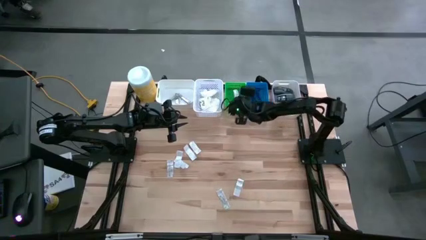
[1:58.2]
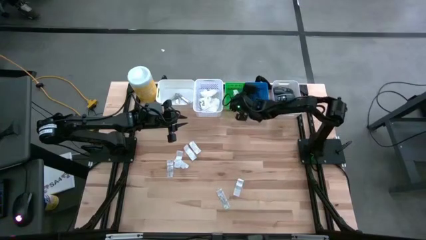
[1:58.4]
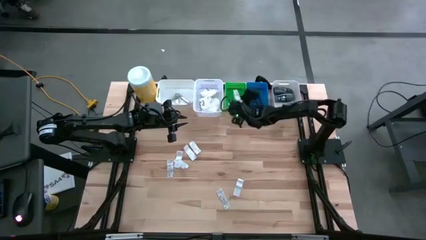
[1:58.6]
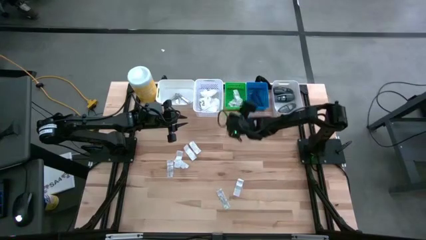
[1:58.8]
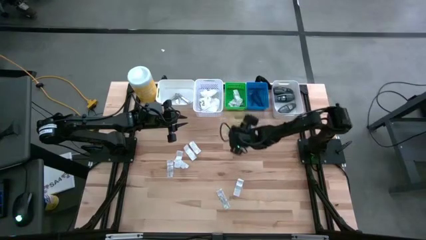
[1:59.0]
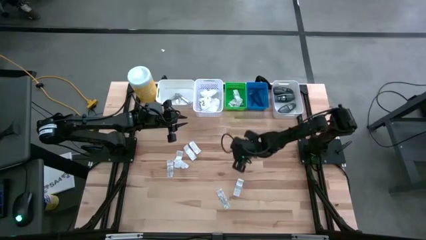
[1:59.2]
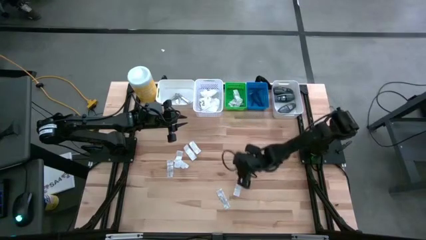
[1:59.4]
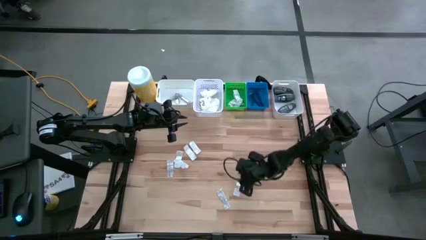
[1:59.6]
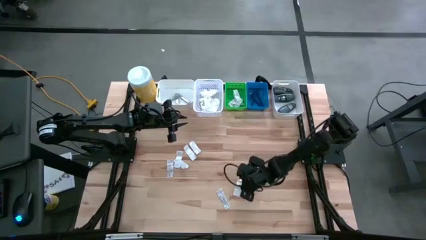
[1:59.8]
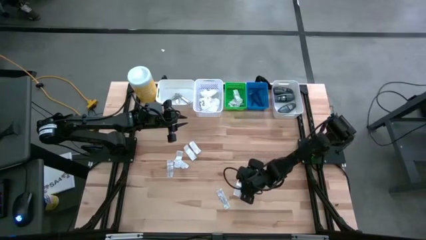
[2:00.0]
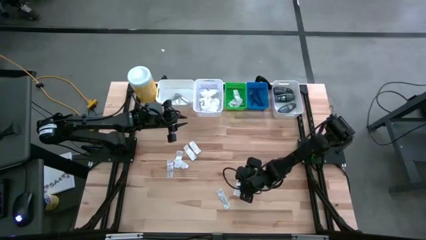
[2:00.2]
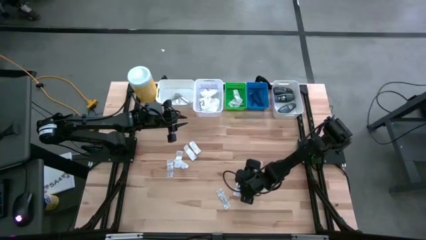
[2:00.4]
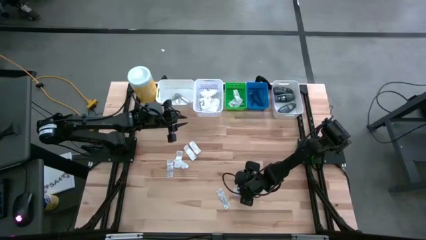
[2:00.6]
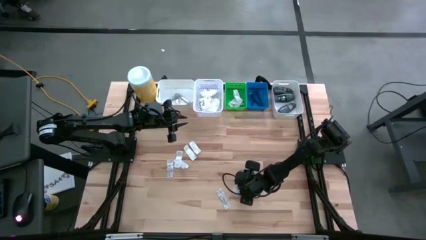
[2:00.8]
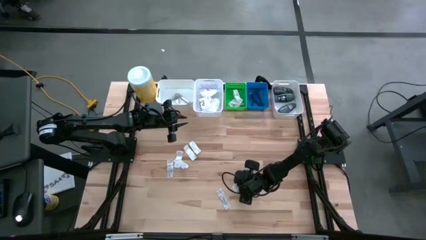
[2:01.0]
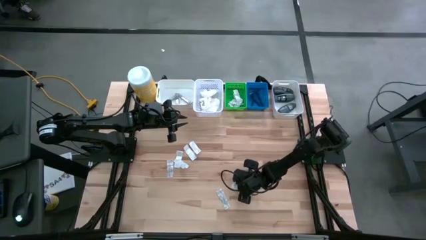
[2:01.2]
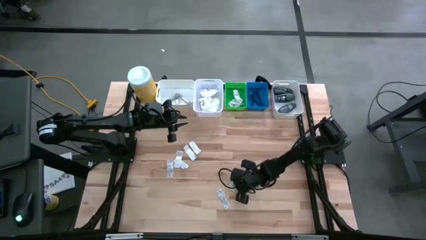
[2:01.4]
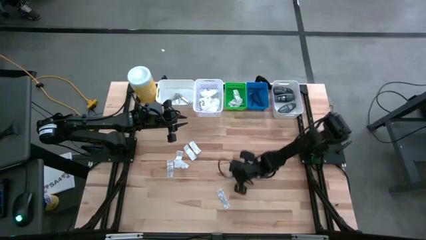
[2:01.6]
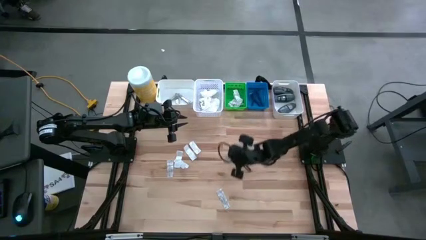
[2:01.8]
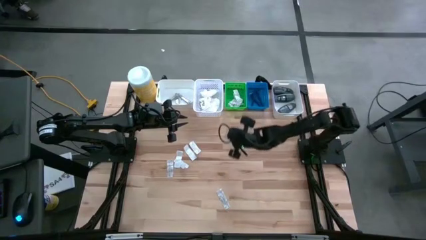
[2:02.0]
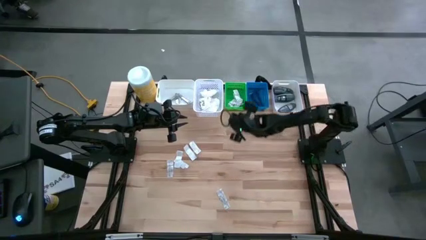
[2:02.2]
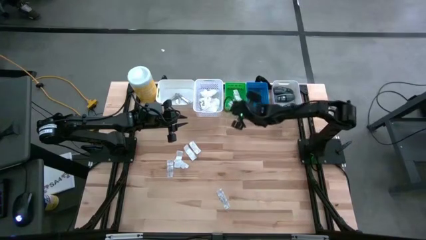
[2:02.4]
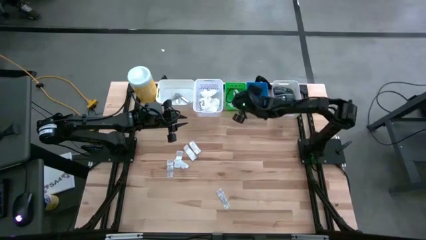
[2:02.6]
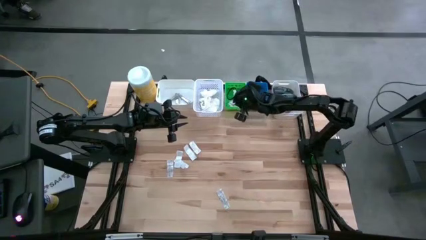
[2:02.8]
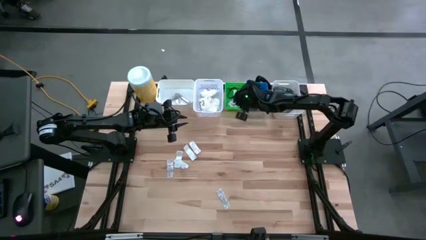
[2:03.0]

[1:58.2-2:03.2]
Task: Pick & Place Travel size toiletries
Put the white bandage into the green bin

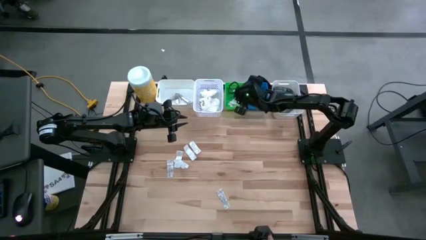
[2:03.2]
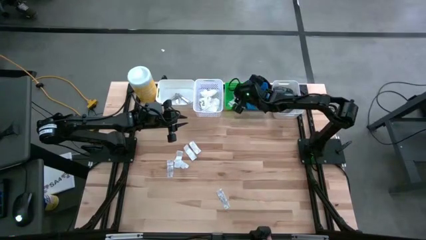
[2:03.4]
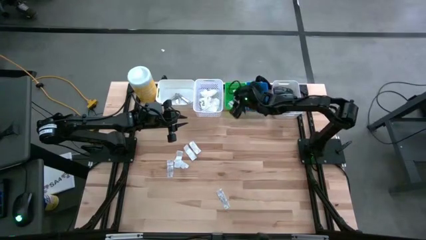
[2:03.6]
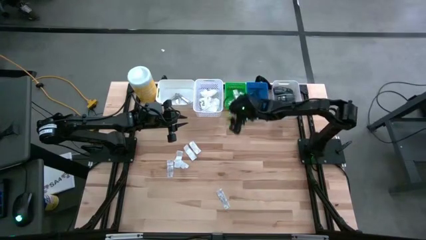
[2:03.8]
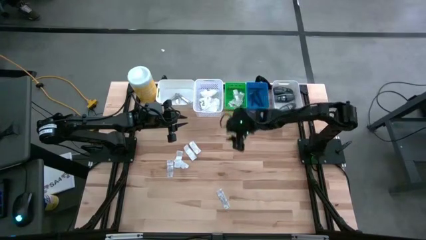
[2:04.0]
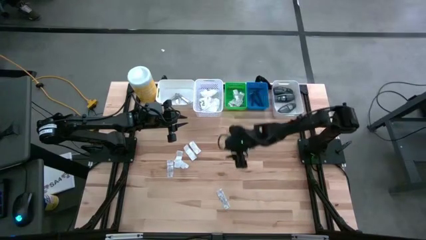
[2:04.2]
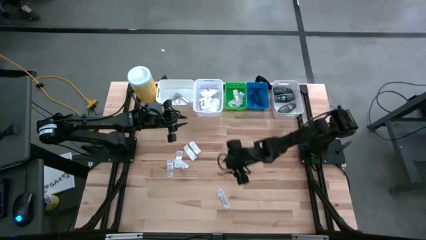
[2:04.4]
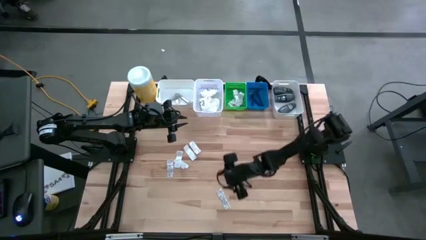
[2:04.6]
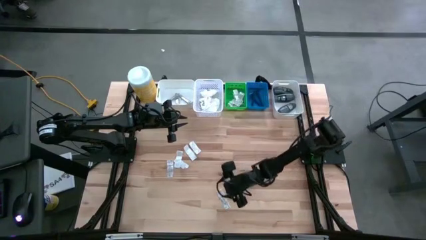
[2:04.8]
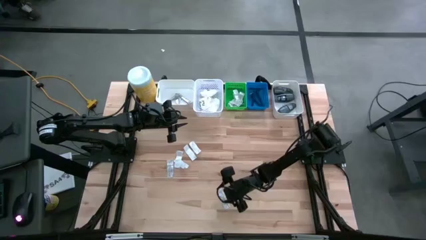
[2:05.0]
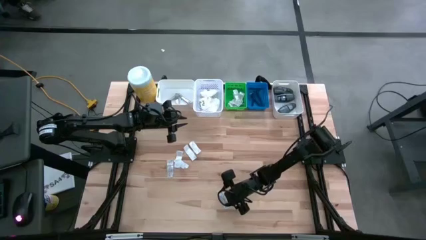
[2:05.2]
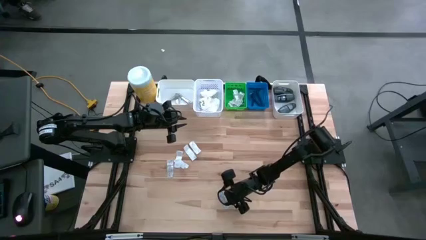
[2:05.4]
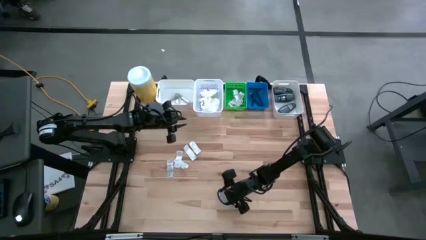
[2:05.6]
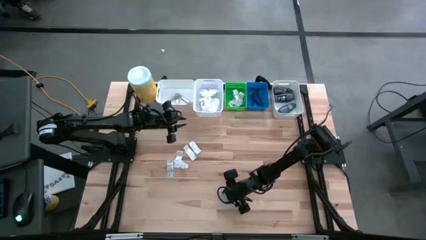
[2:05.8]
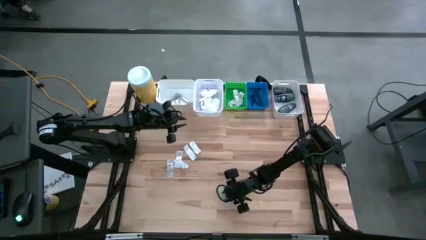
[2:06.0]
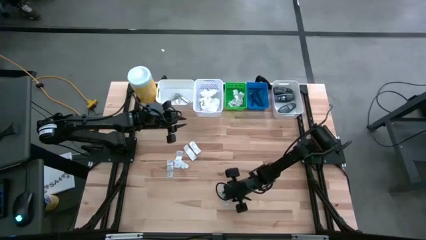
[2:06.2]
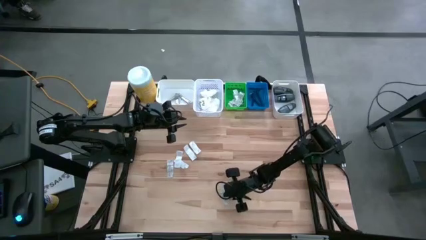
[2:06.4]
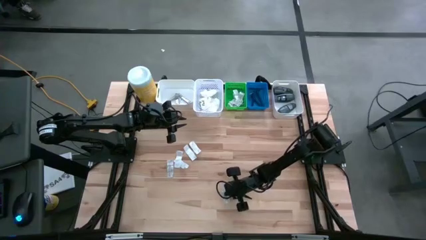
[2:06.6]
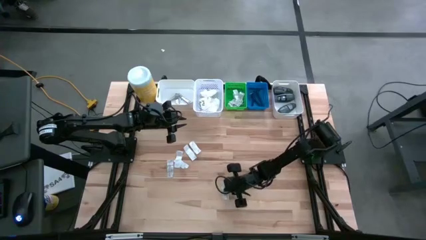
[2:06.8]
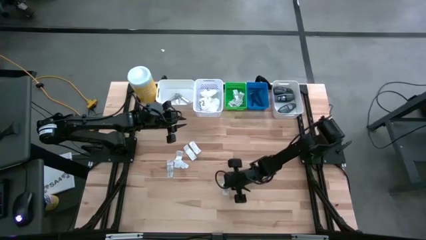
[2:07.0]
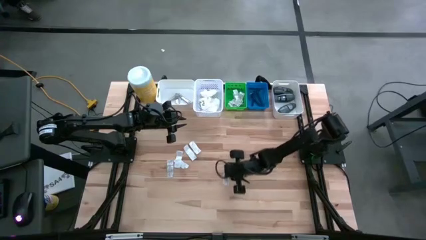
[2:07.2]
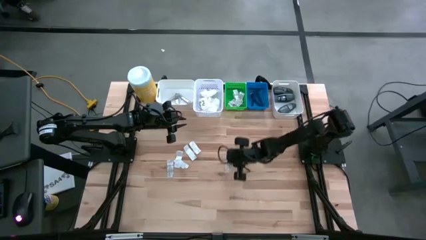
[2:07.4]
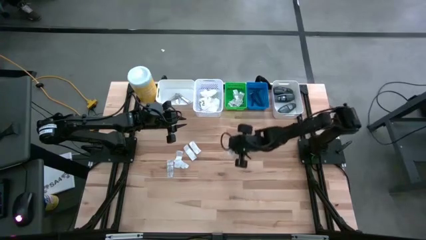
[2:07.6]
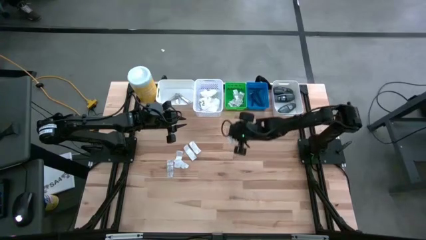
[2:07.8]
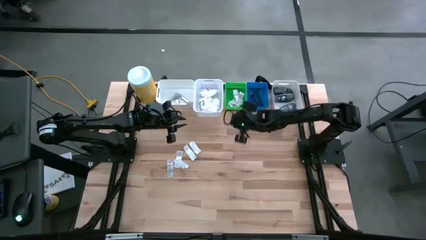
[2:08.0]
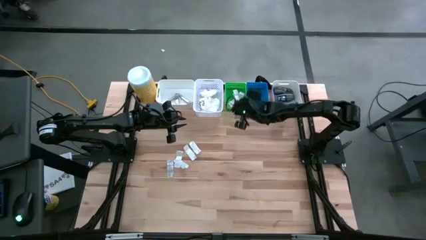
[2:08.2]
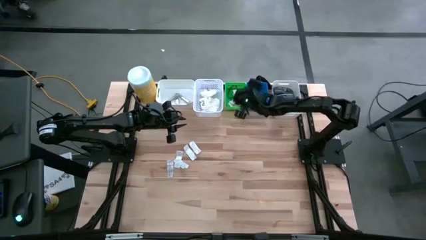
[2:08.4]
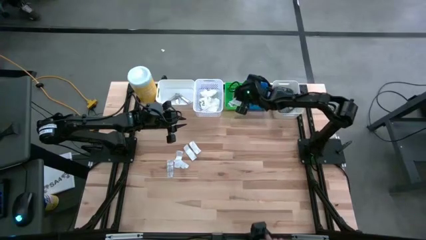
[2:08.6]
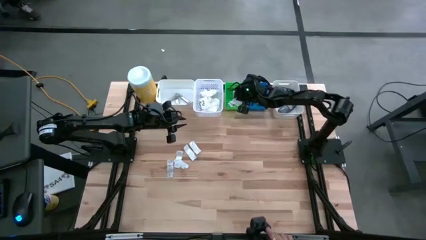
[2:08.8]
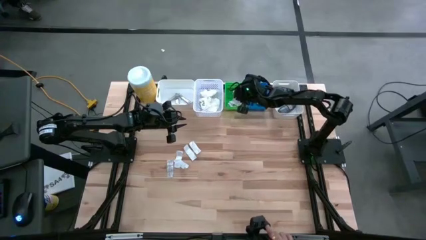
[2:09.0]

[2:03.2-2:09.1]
Put the white bandage into the green bin

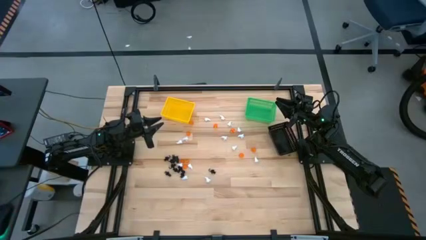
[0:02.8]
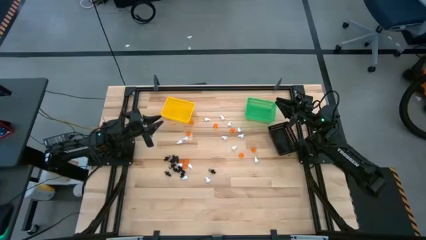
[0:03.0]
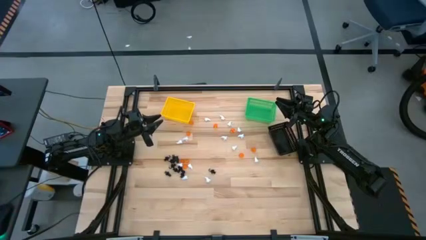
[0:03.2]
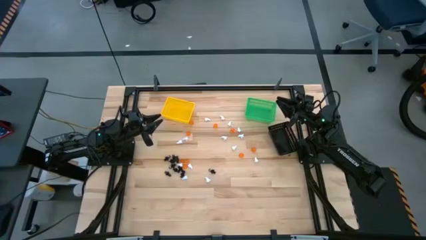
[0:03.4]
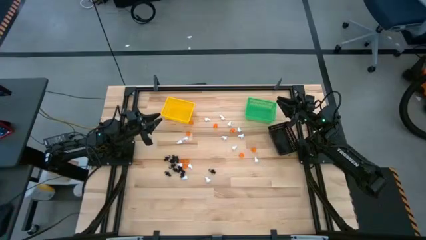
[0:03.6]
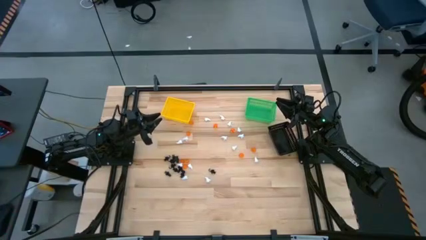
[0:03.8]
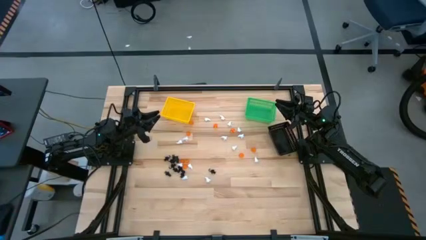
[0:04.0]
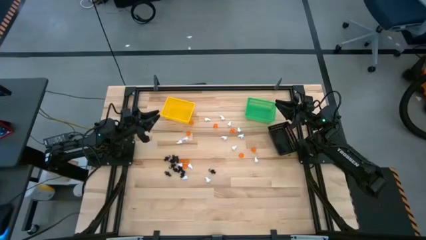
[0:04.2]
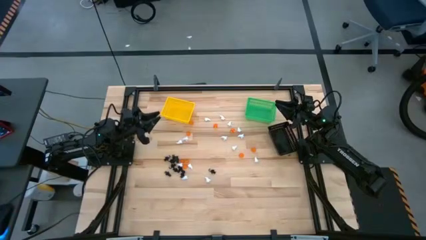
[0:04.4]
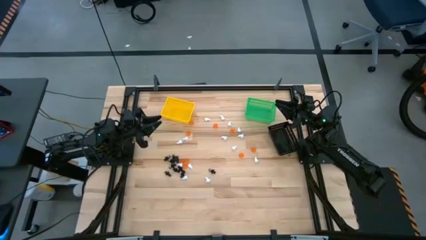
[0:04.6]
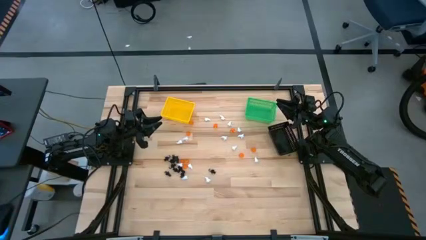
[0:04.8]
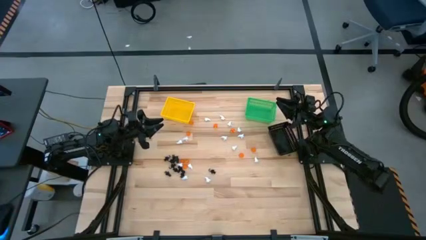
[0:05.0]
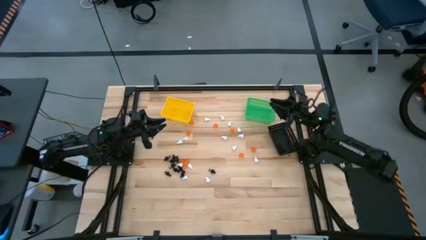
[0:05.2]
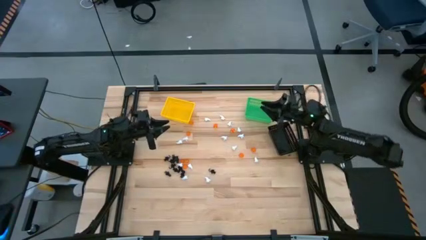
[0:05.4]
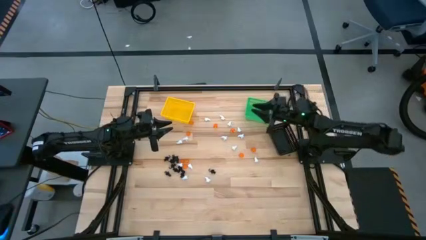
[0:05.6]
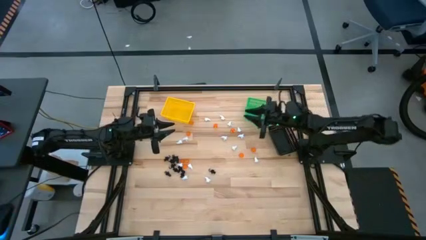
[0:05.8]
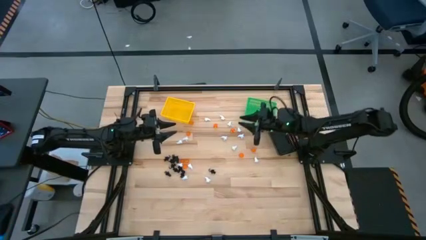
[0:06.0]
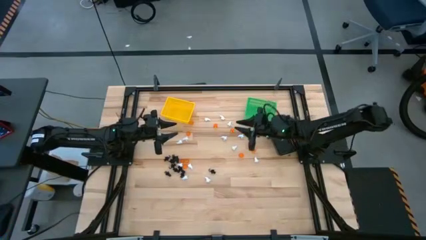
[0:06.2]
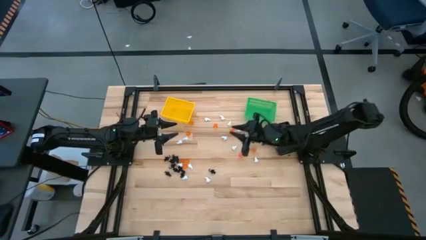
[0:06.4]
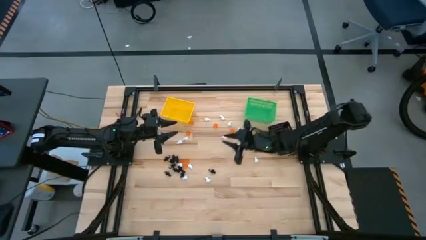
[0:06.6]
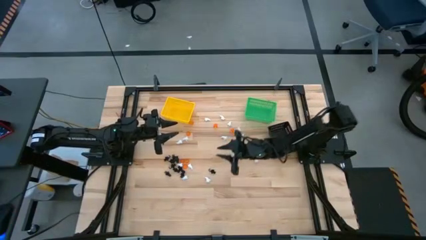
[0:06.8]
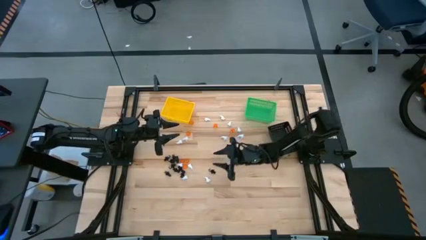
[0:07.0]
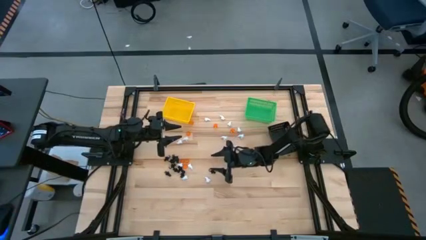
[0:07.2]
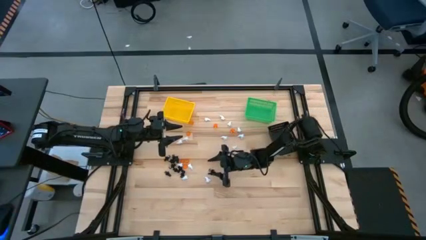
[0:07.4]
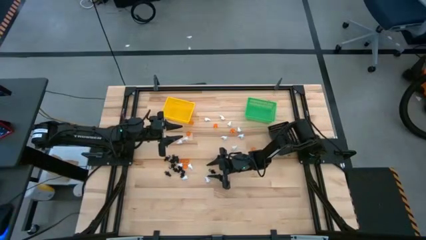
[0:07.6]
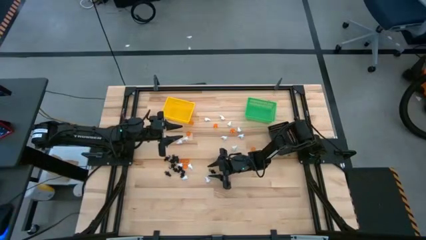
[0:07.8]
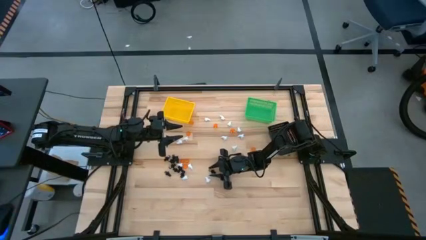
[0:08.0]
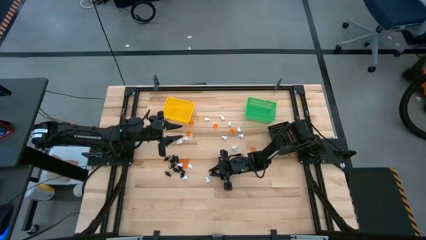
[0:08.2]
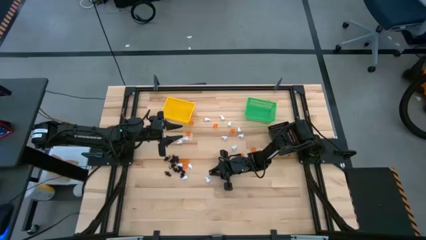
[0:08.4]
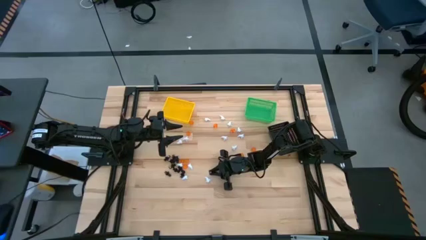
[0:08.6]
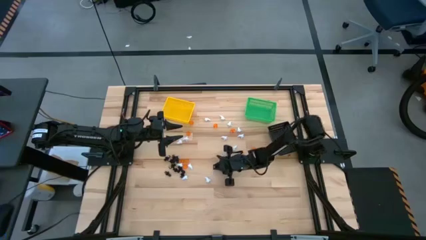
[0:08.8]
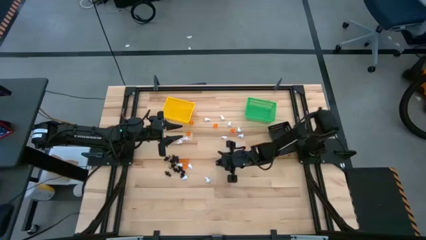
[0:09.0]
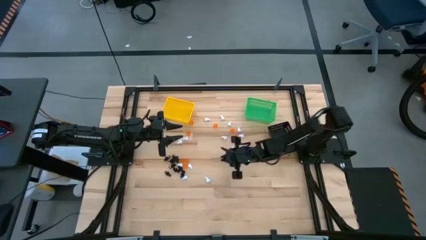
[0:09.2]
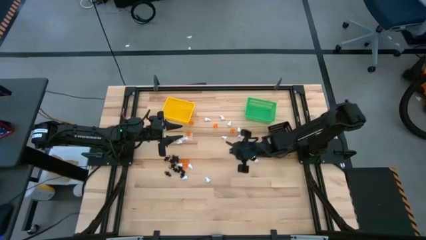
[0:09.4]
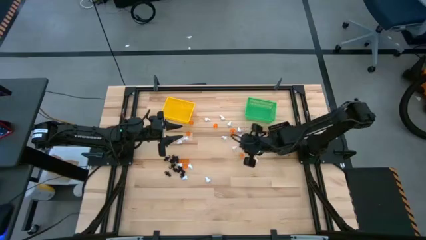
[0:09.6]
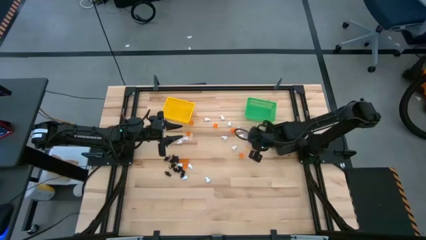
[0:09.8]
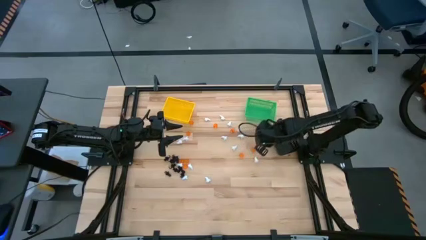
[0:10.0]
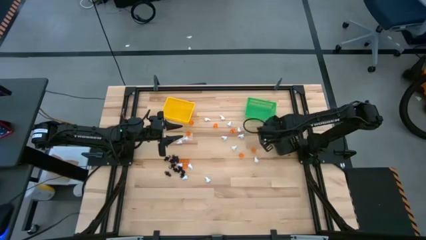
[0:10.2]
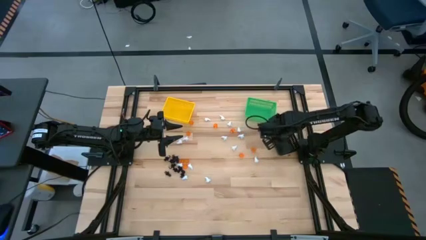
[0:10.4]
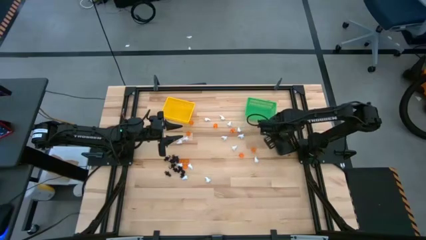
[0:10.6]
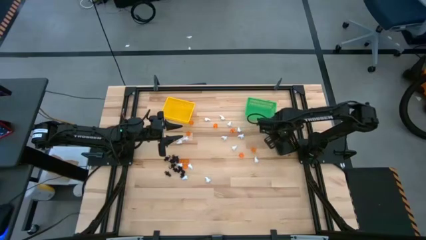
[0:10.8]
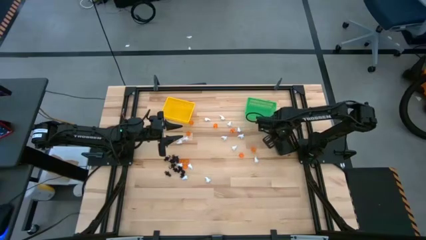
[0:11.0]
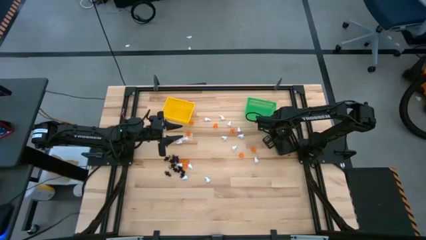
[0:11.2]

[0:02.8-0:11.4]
Task: Sort Halloween decoration
Put the black skeleton toy into the black bin
